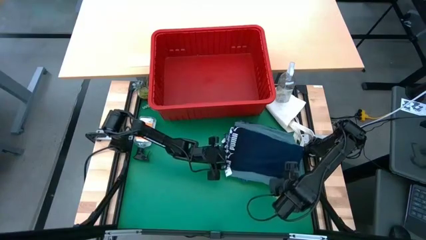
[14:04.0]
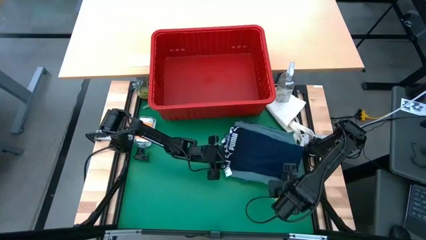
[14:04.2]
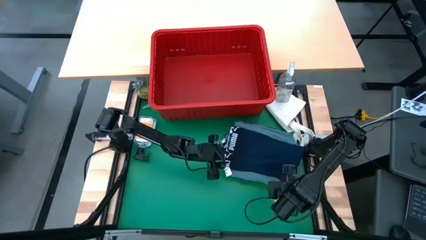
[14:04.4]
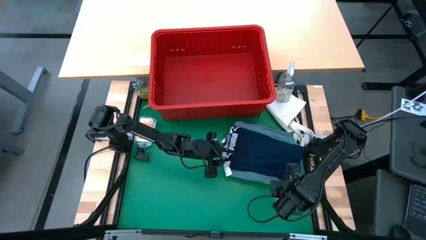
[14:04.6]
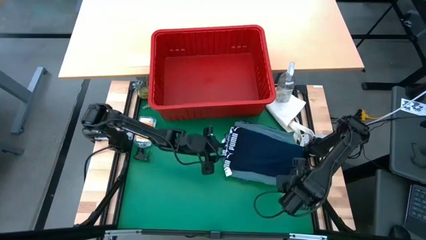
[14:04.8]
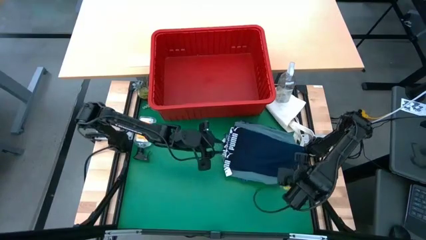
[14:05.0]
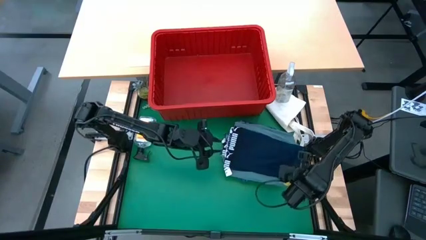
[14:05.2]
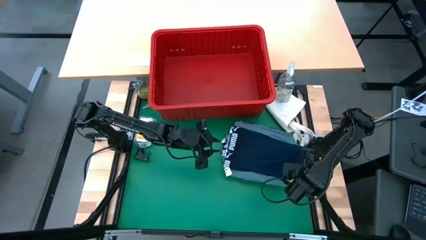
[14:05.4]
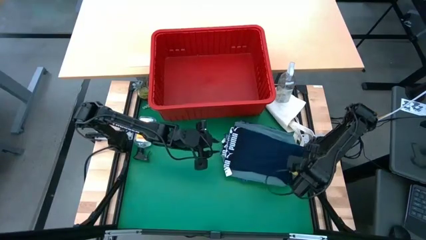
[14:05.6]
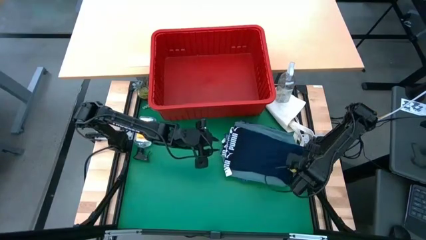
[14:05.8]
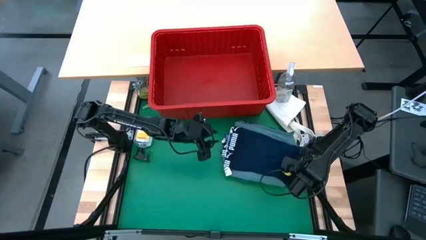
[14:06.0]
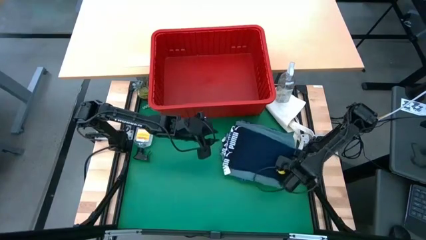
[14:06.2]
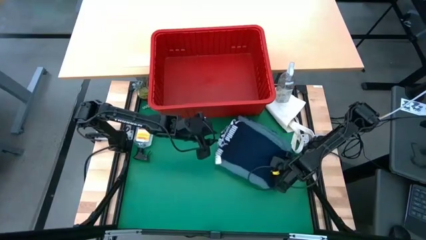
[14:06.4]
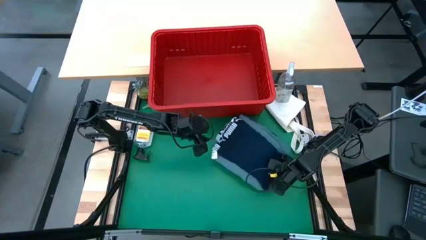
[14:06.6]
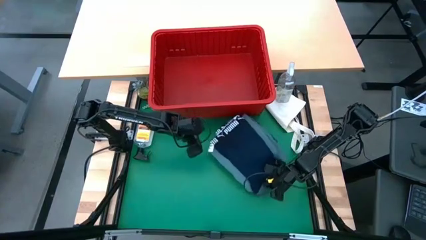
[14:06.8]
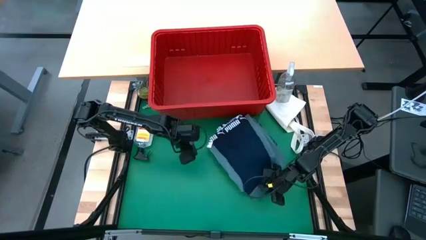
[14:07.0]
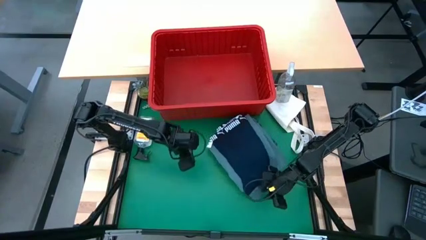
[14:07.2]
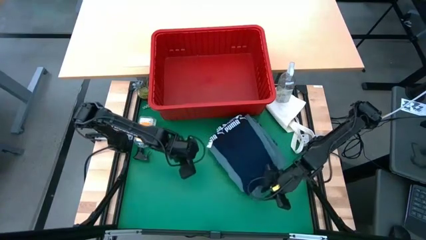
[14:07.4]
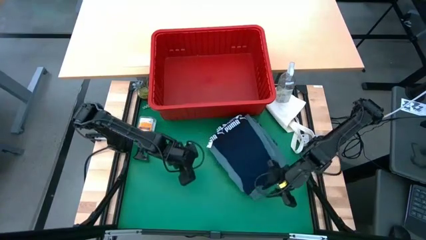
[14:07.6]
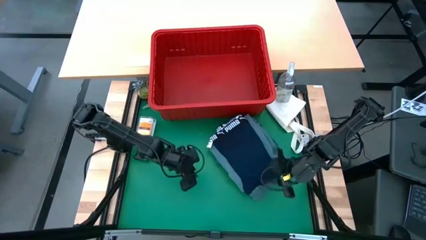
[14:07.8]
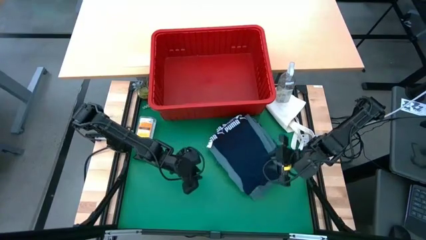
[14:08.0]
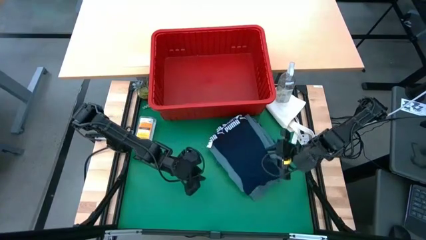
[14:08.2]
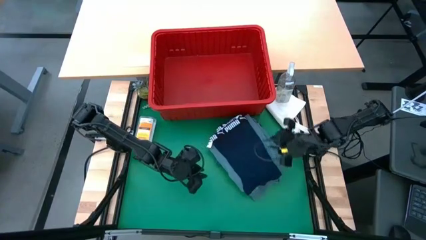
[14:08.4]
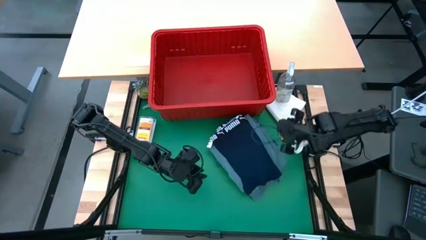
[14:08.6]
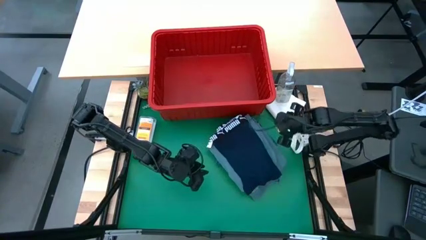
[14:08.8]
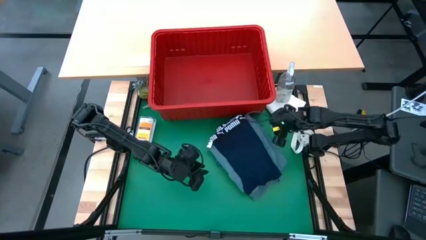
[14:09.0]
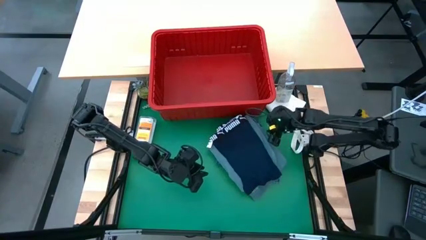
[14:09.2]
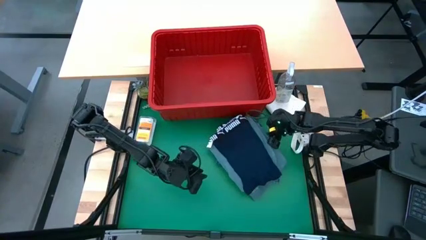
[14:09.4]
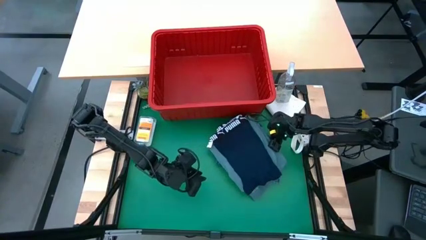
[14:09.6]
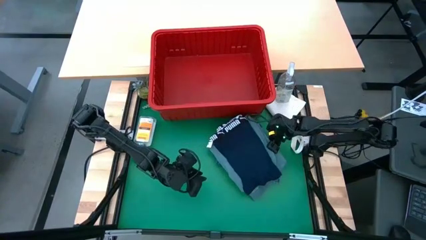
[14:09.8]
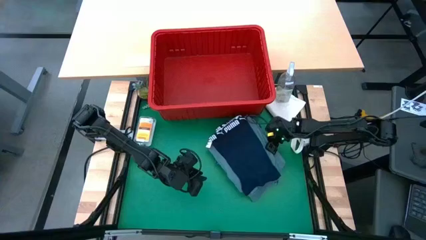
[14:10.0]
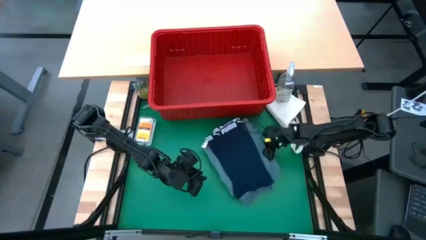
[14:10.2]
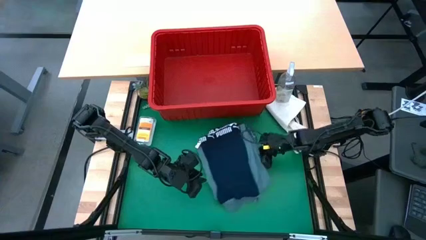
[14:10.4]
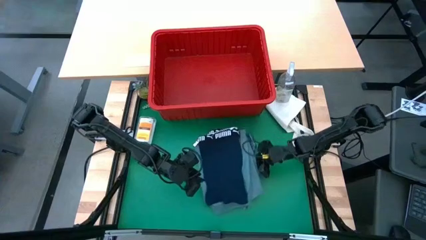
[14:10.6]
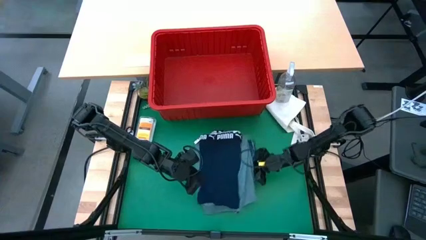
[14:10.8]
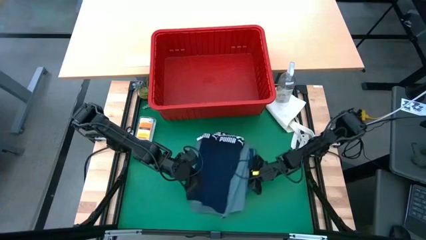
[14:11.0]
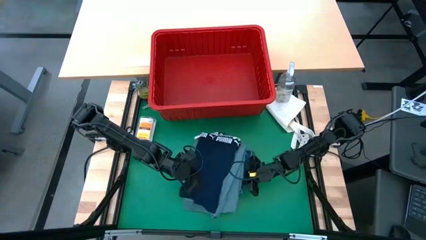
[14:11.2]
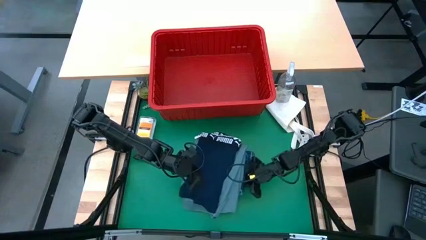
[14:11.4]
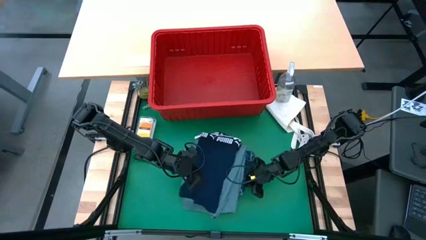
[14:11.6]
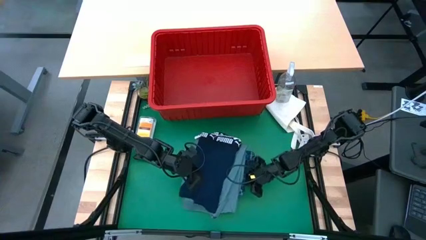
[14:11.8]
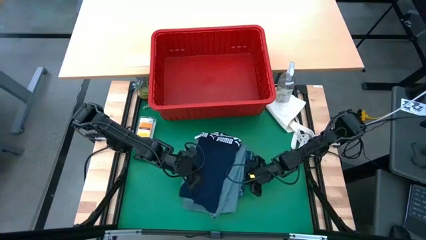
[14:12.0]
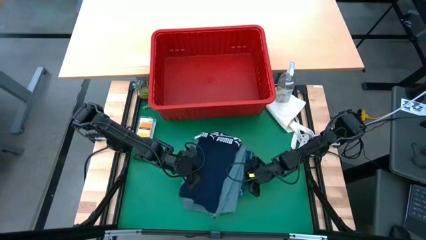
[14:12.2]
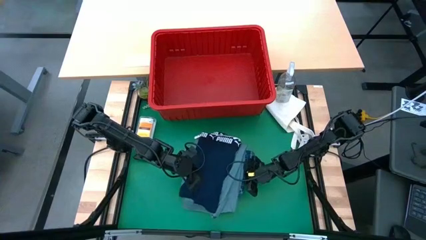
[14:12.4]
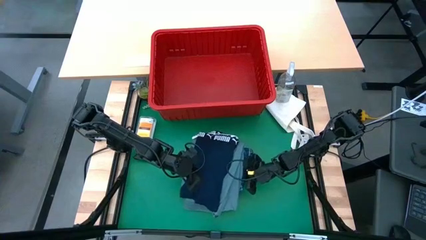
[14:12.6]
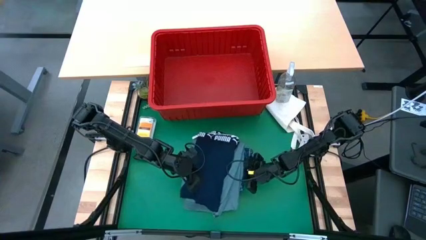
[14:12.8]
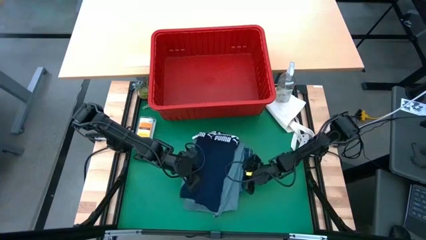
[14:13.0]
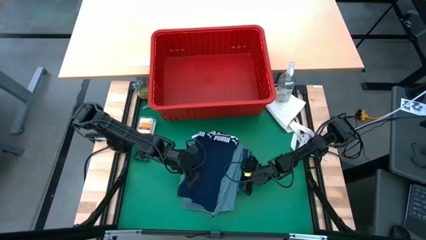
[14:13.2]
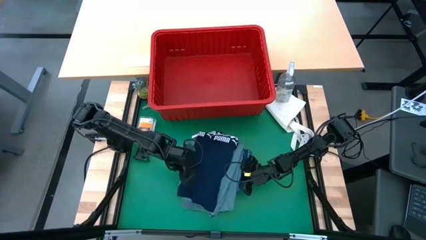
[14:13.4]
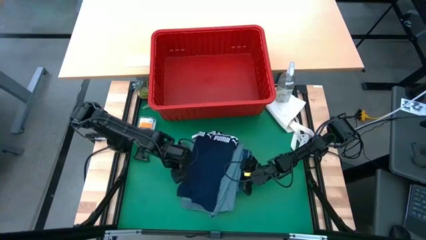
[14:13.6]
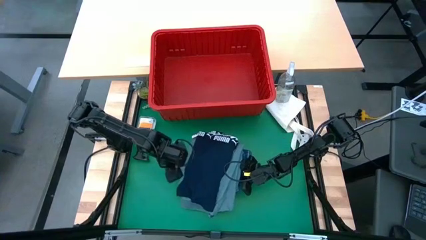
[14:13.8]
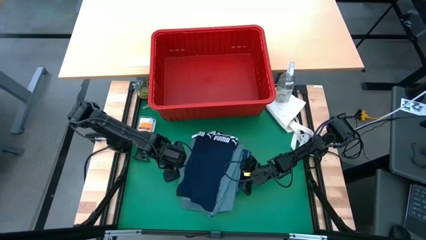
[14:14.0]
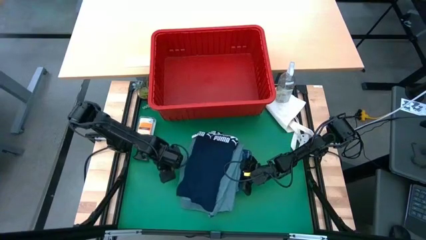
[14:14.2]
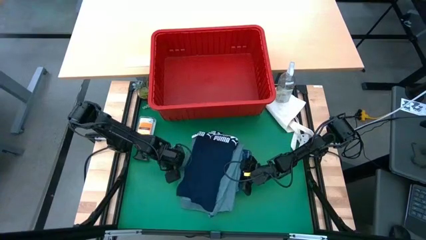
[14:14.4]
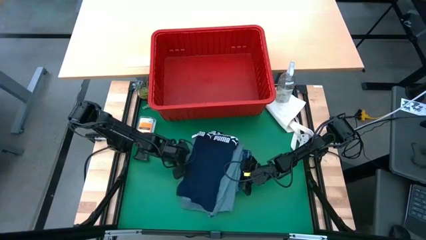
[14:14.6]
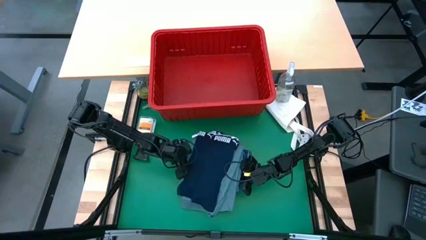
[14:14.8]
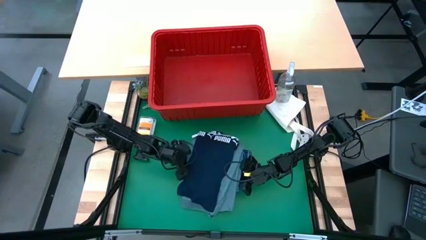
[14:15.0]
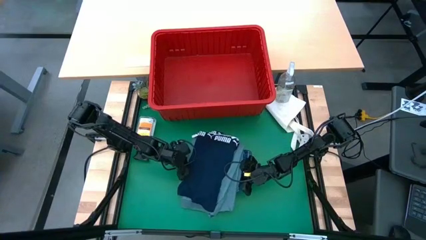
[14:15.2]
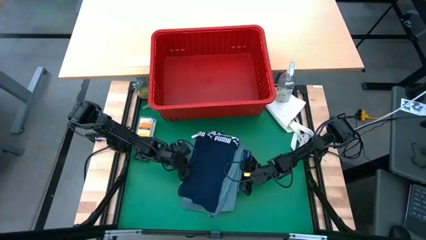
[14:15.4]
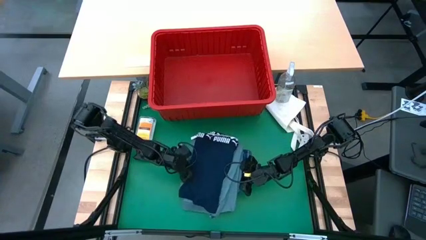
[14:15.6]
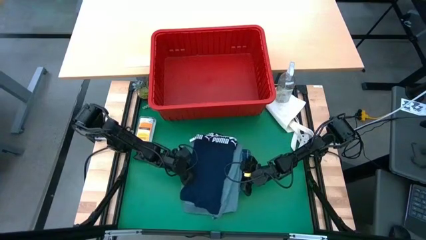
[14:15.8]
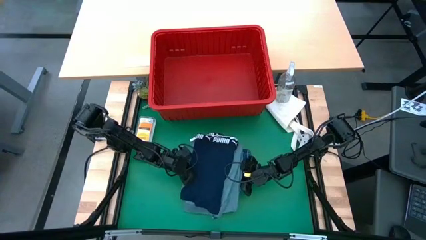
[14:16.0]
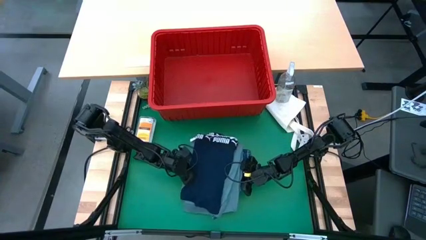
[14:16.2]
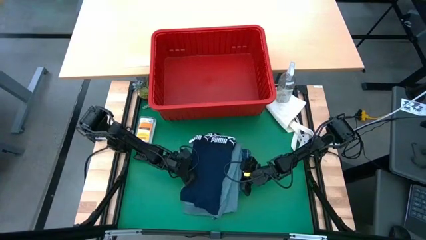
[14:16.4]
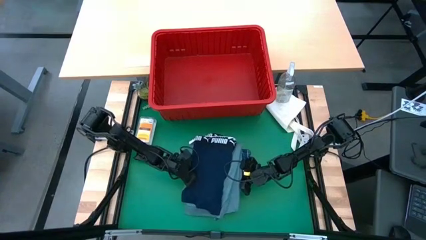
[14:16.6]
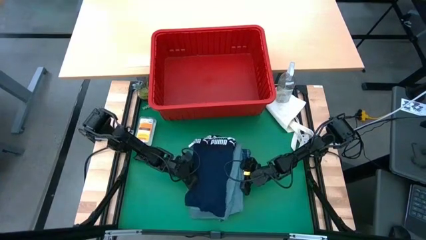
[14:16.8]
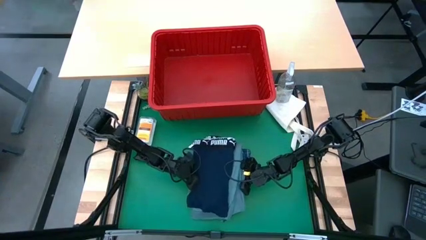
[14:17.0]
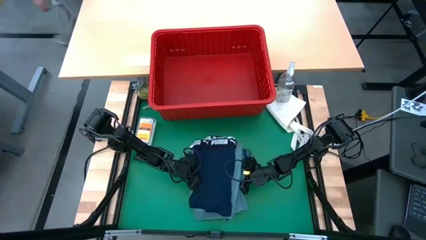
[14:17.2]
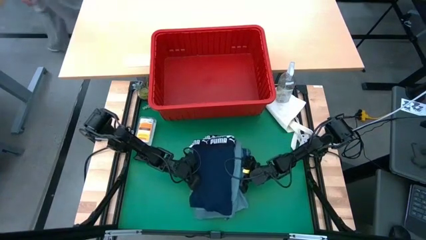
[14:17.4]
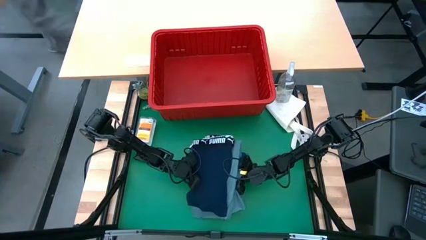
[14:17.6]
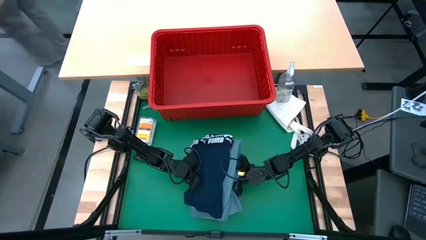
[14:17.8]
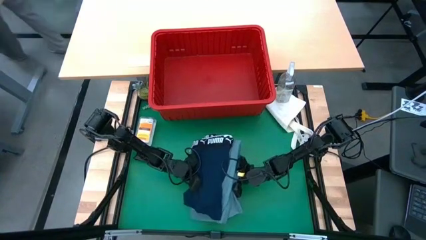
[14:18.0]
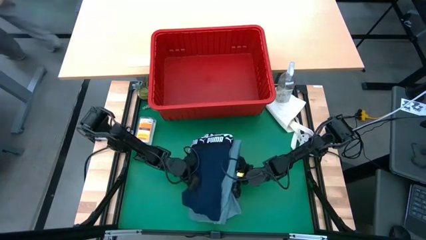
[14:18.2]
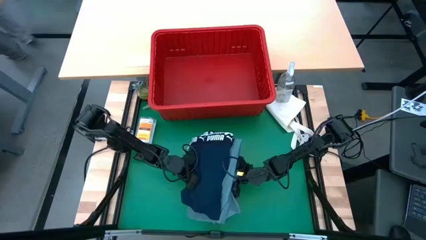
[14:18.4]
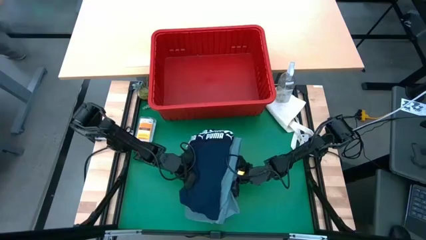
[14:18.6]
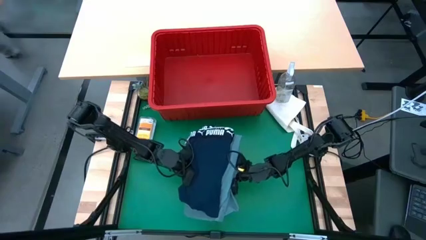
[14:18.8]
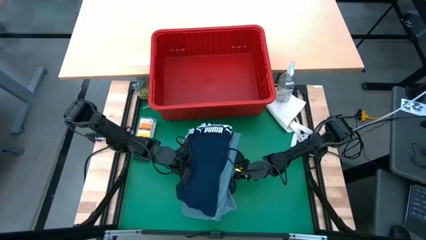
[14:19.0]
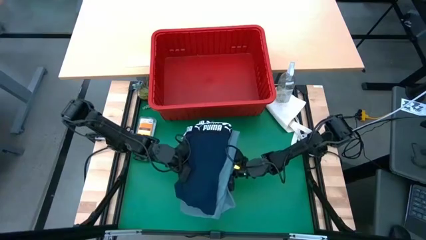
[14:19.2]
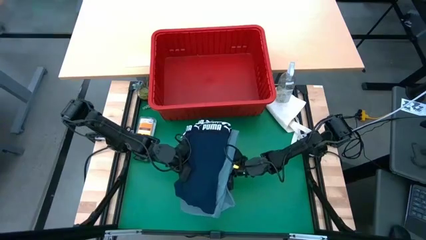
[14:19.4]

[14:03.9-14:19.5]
Task: Fold Laundry from Bin
Put the stacked laundry into the red bin
